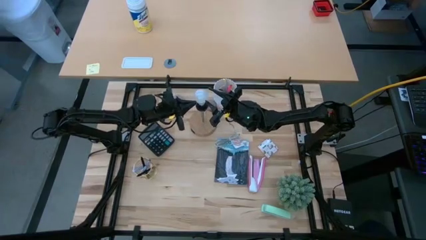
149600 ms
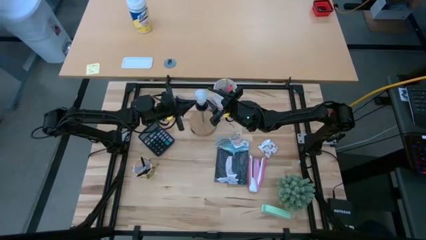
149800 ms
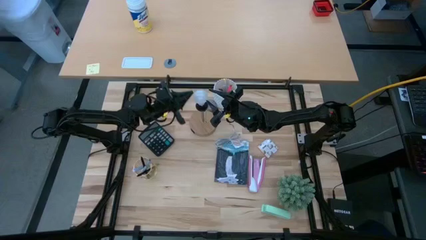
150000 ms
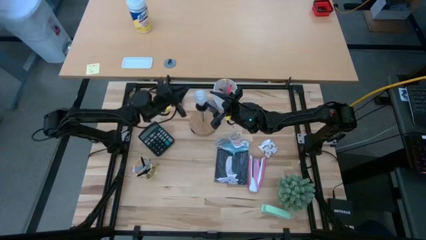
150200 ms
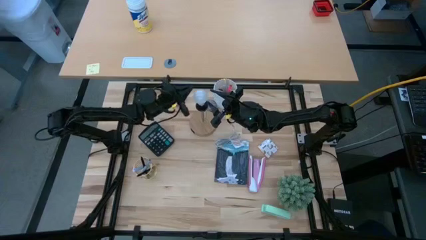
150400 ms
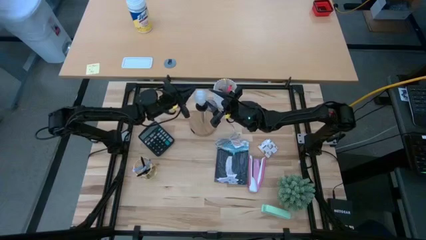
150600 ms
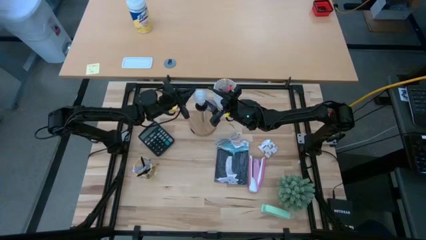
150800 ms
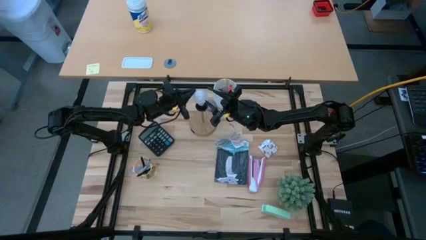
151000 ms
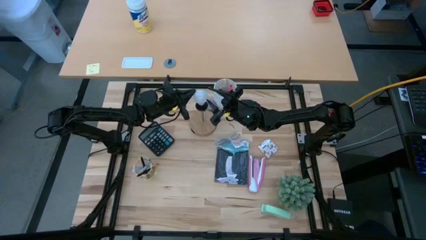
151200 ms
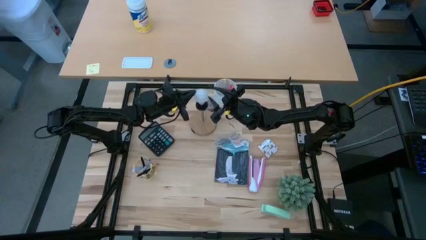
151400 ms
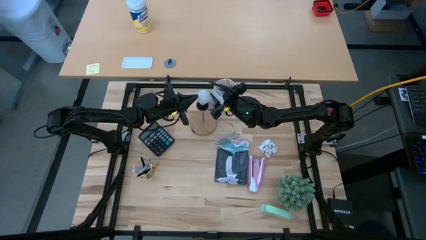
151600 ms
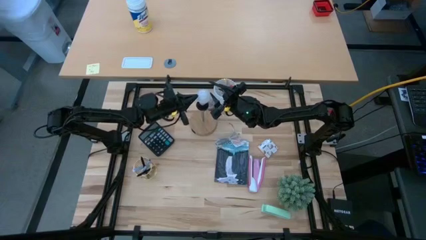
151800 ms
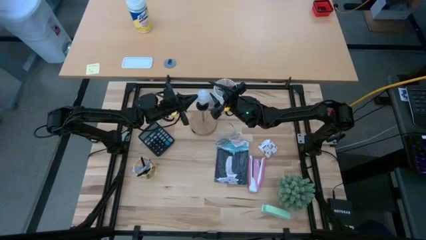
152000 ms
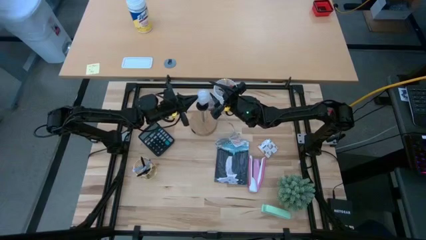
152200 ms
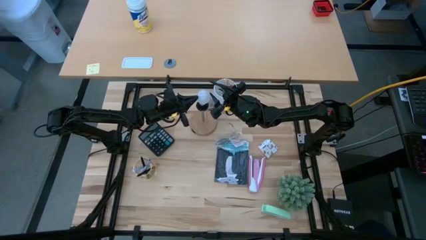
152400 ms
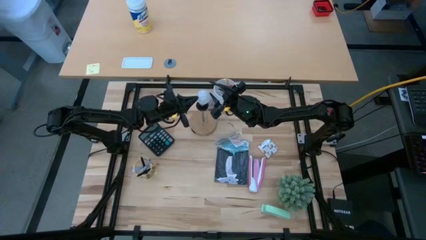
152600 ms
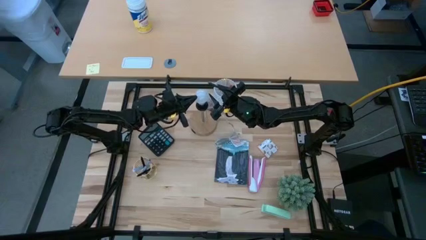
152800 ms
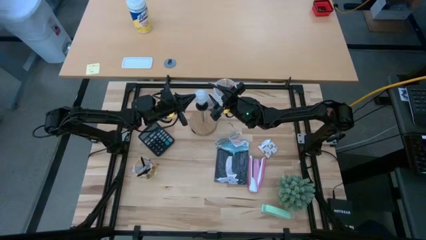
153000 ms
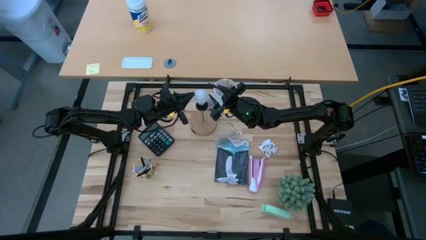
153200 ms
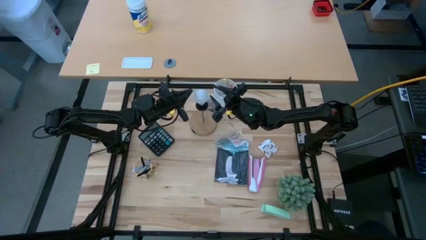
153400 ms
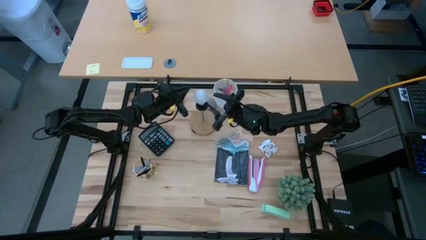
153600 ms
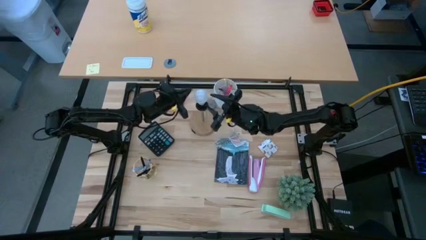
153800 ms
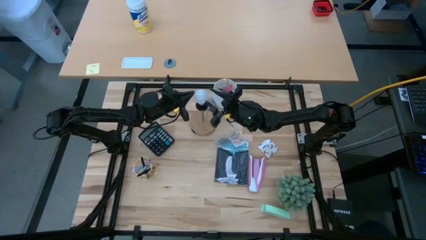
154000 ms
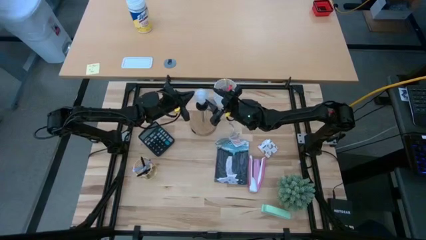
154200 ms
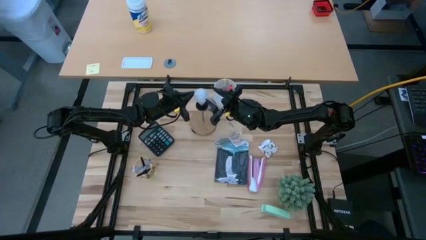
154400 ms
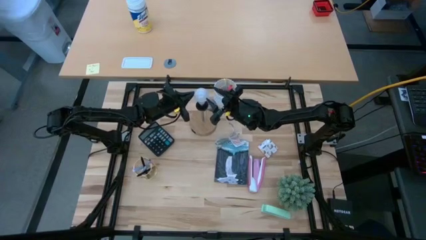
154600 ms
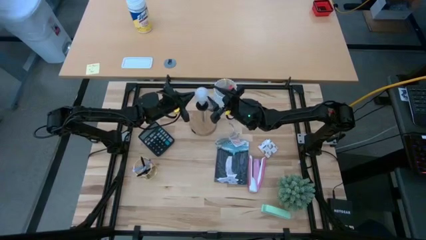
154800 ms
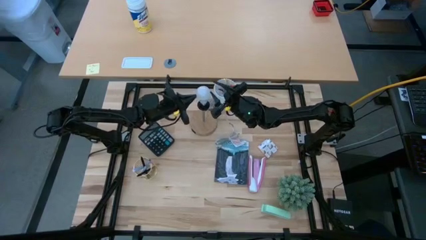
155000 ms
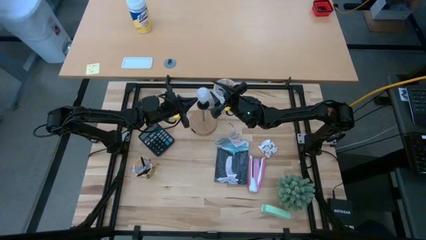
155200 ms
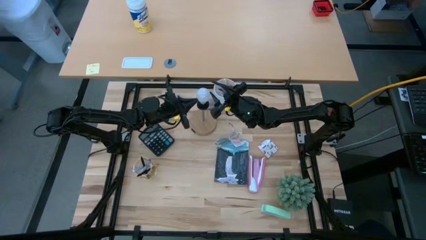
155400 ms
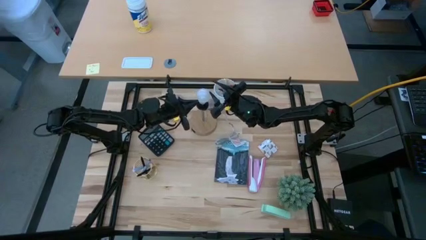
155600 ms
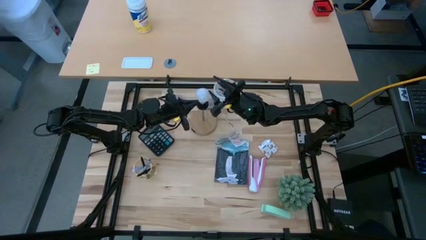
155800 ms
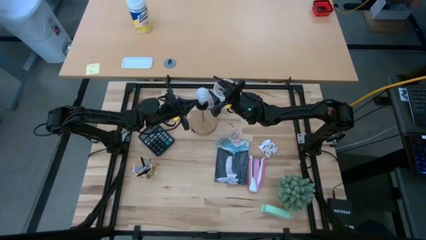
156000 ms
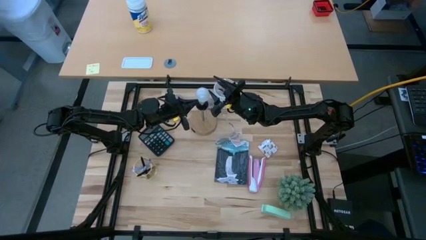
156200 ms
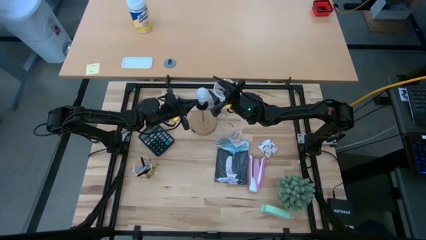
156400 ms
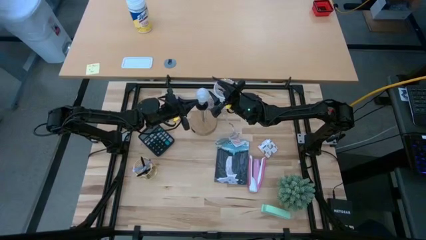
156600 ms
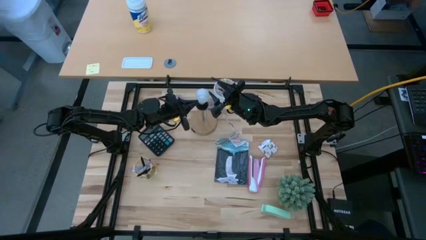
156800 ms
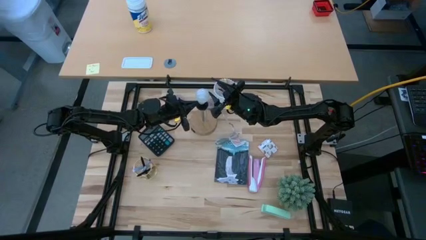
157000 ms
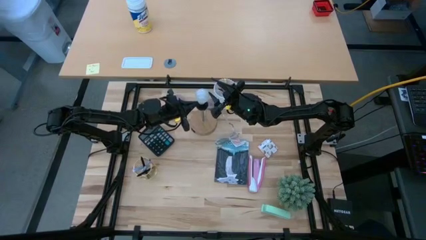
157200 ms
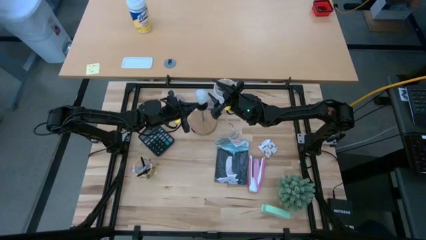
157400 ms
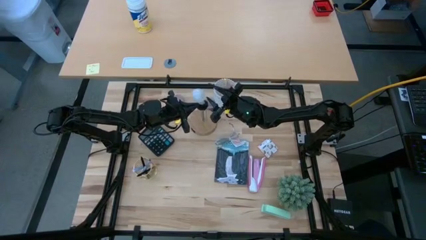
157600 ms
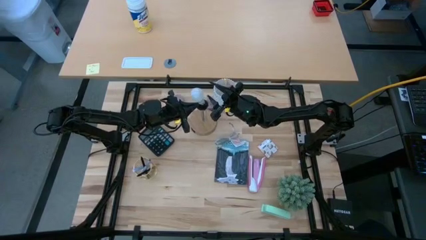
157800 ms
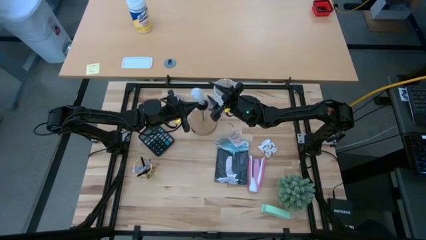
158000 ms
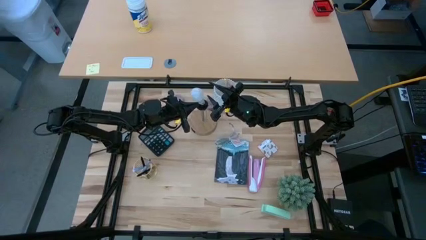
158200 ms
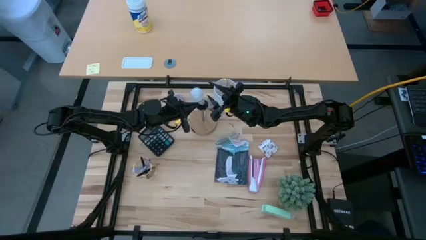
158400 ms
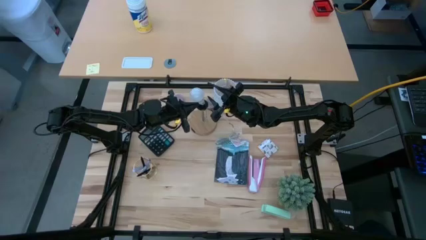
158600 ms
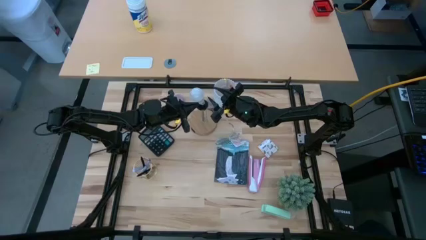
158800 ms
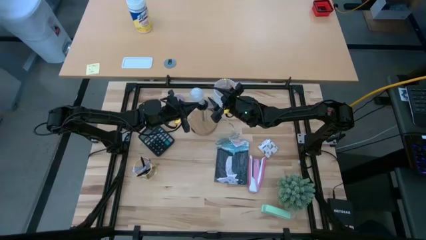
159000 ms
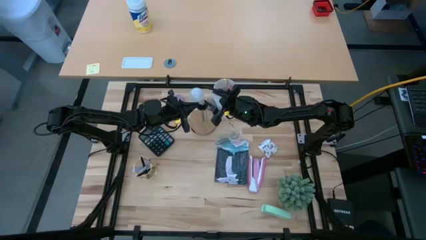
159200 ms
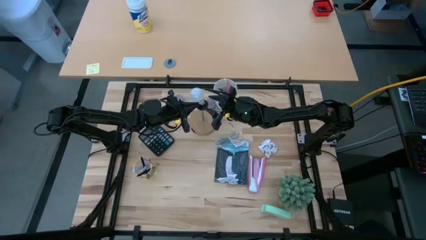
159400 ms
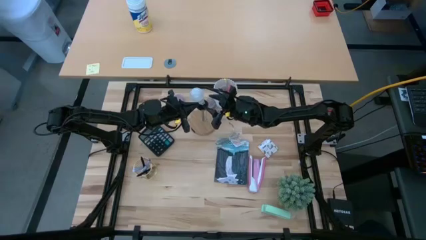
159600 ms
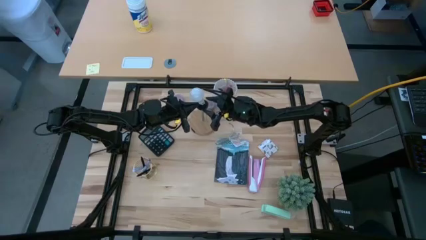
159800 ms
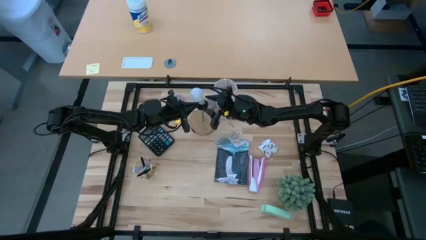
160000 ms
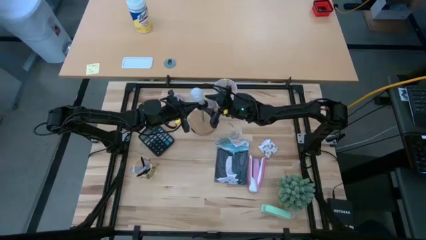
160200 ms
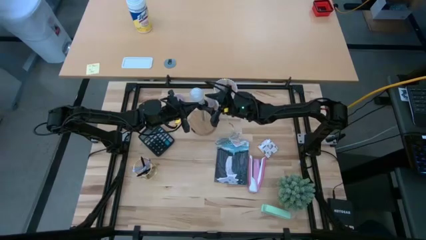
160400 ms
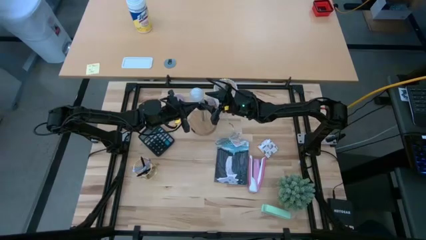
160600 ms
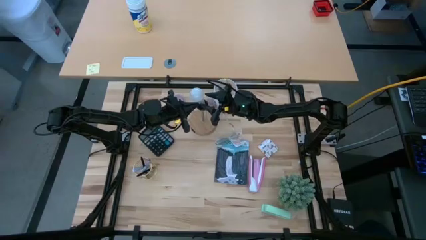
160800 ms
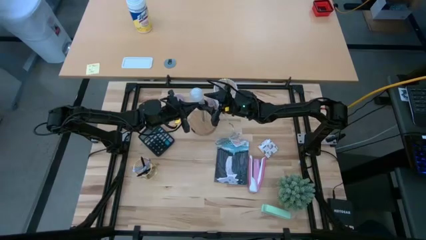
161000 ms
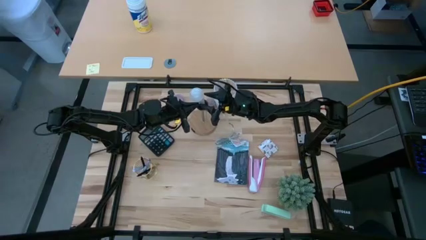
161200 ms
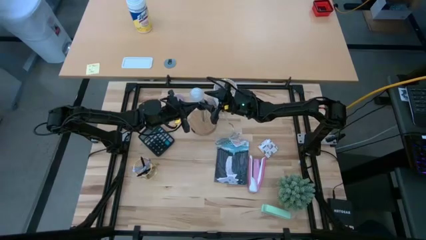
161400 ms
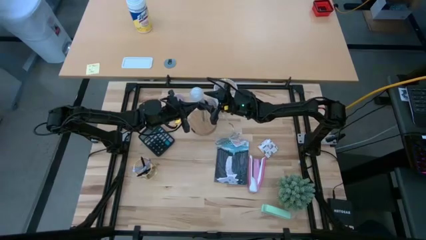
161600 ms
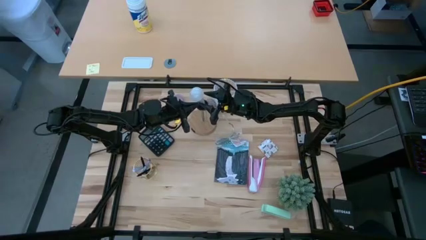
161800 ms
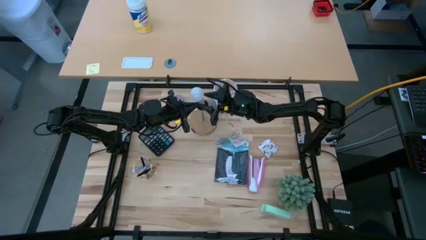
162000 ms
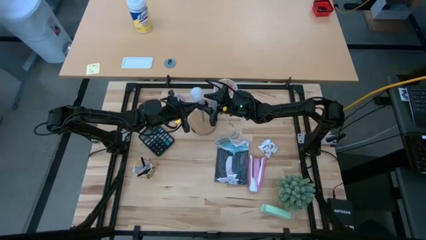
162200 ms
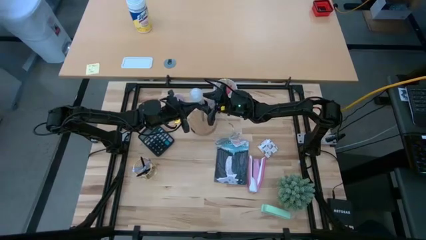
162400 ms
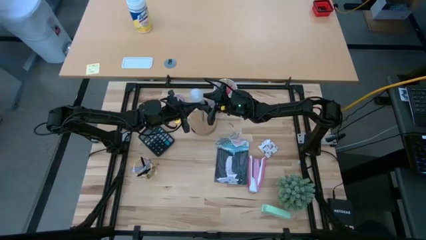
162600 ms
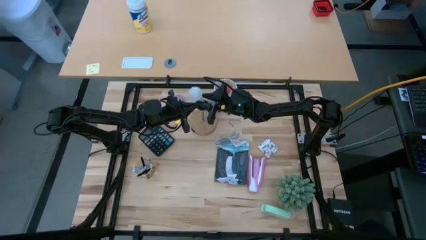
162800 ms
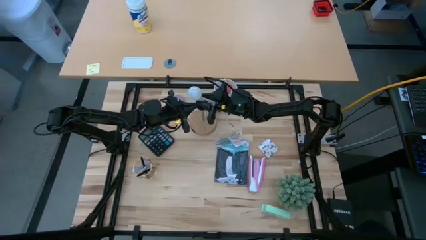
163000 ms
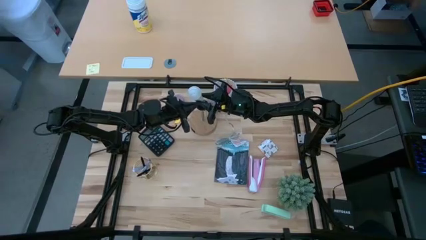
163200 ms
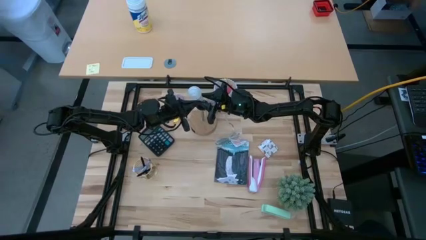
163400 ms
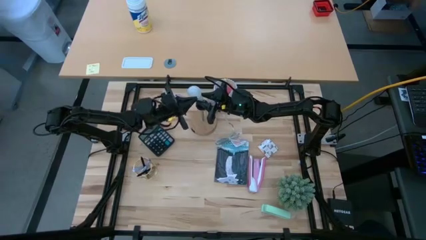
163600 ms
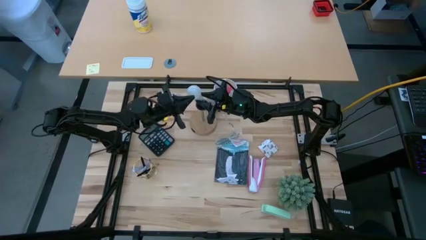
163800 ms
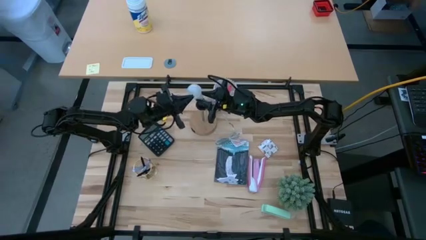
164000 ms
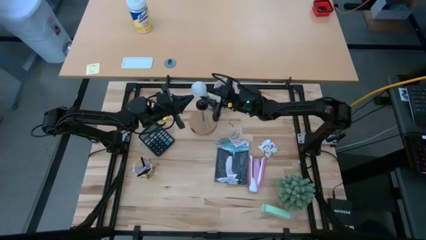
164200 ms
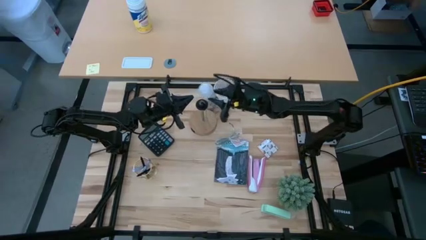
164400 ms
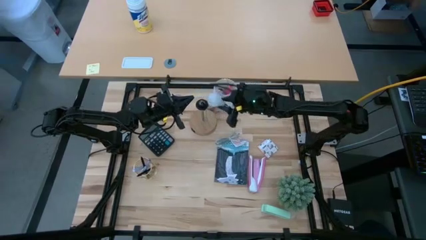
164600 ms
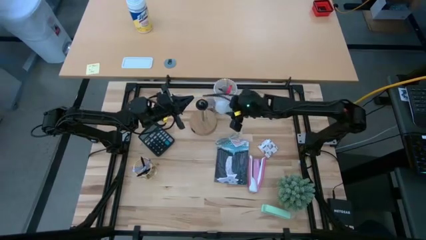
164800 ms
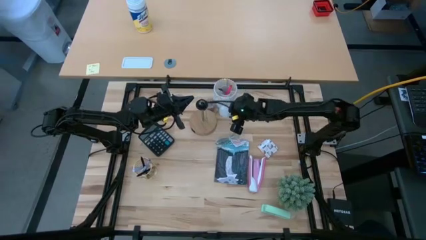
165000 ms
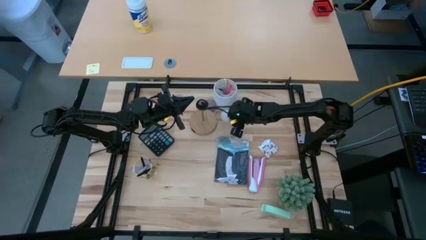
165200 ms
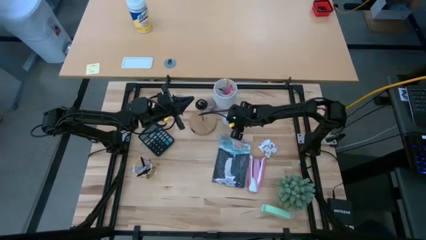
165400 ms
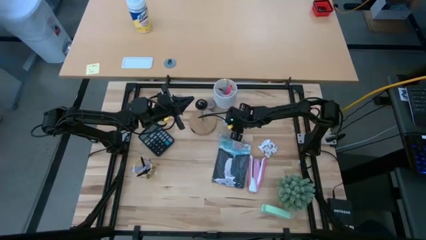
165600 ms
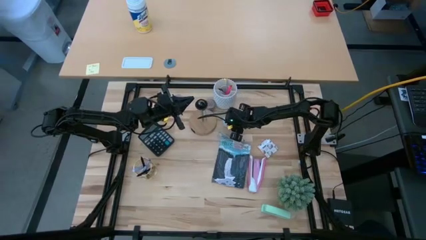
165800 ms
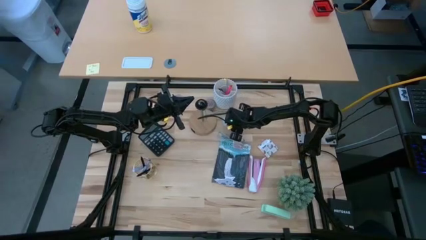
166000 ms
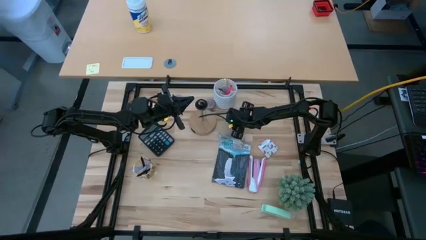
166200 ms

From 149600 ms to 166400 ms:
Task: Screw lightbulb
Remove the lightbulb from the lamp
